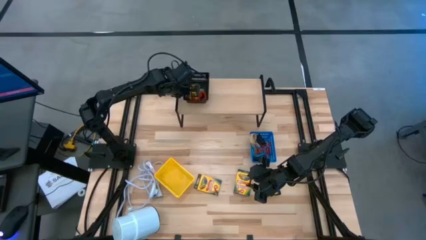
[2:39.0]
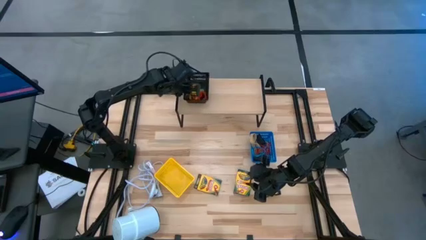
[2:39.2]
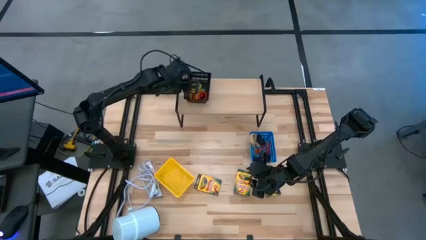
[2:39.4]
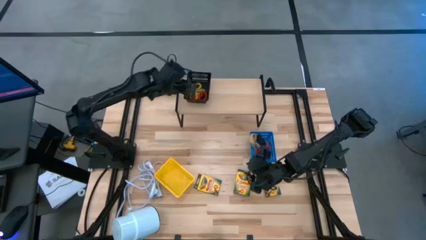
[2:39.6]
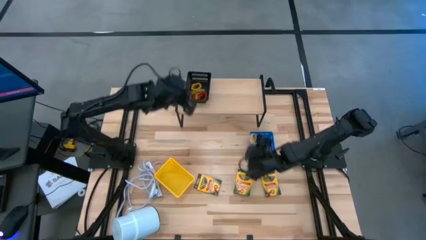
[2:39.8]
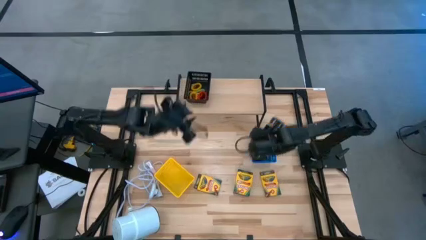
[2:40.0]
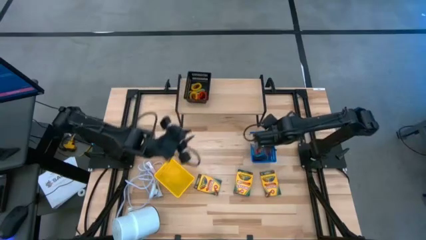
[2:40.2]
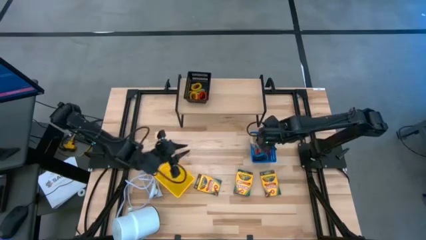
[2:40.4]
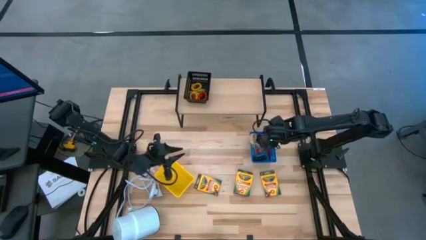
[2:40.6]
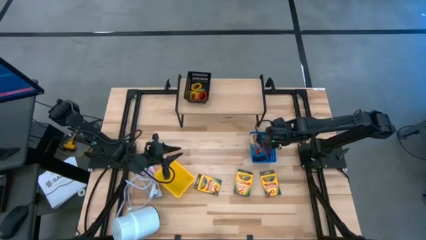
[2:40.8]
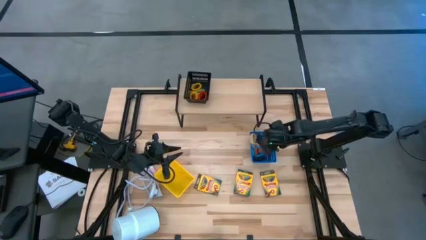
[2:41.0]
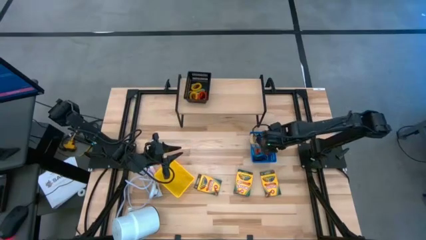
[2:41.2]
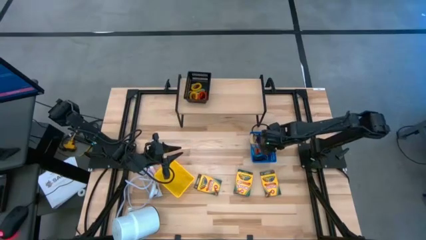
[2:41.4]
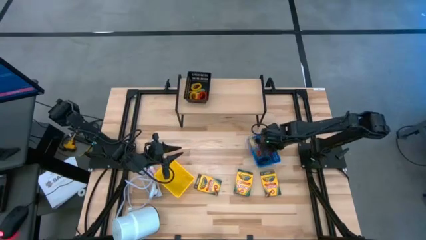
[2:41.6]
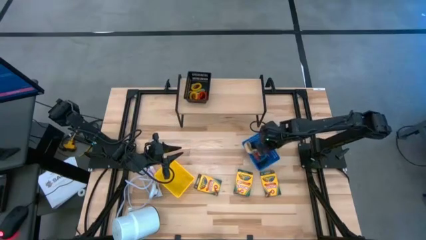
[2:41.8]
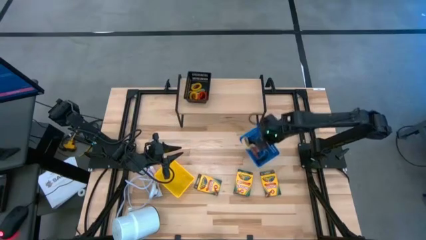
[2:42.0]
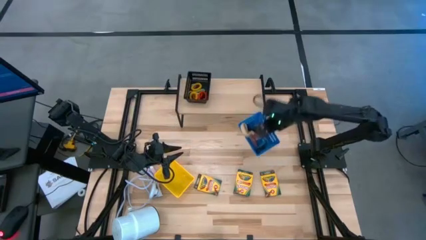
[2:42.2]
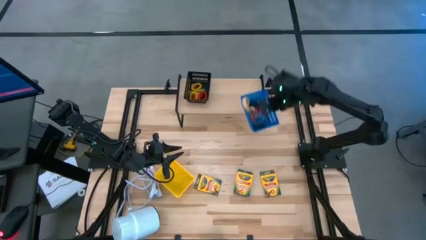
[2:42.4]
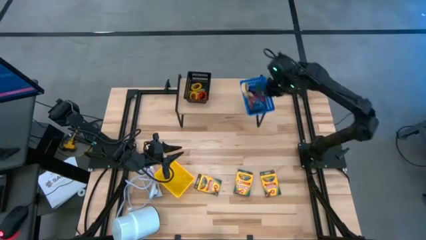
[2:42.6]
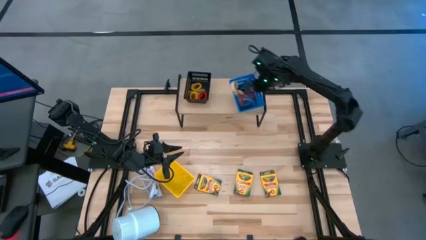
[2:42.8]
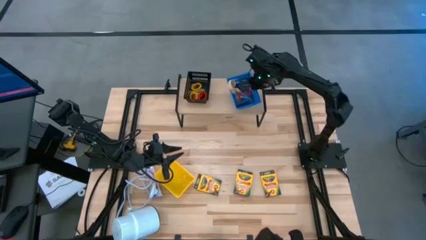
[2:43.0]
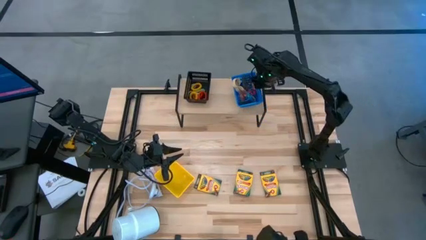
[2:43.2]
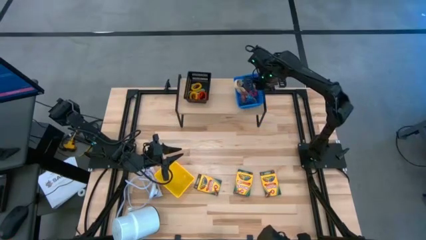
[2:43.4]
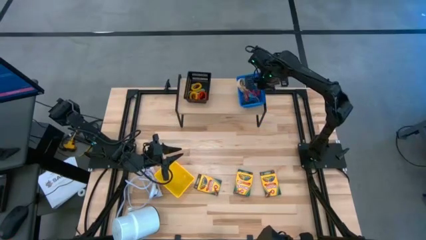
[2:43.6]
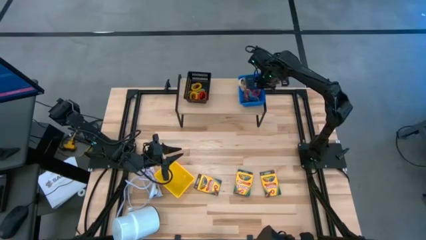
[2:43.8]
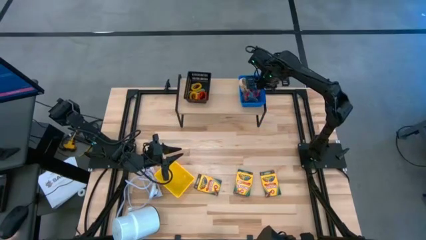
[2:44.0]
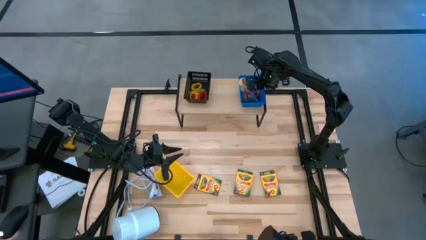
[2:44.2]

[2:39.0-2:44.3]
Task: Pick & Place Office Desk Supplies
Put the blue bin on top of the shelf

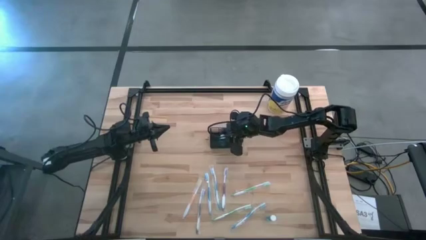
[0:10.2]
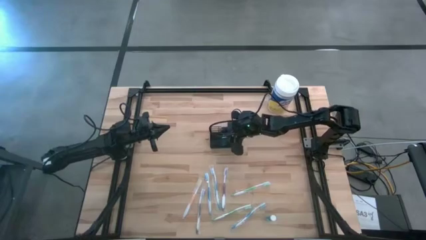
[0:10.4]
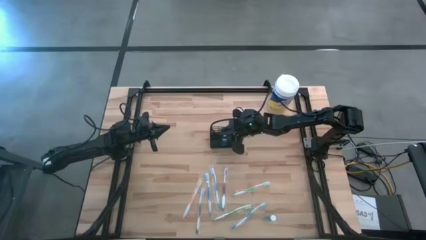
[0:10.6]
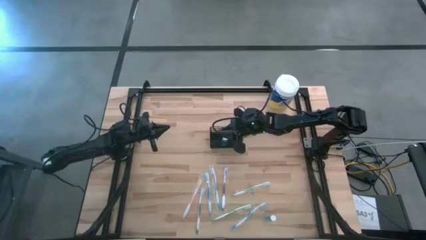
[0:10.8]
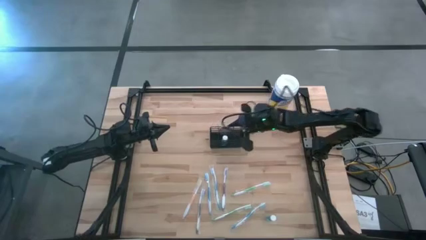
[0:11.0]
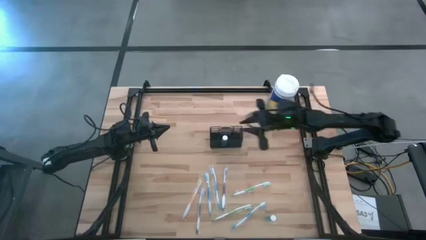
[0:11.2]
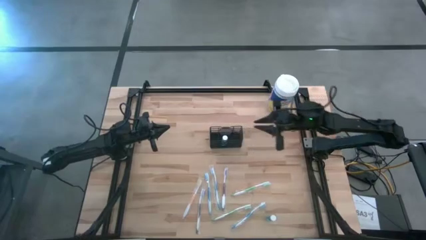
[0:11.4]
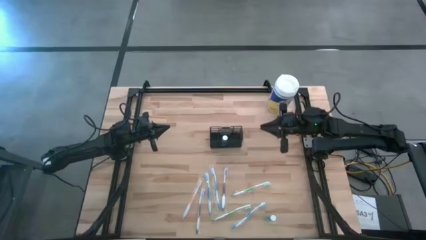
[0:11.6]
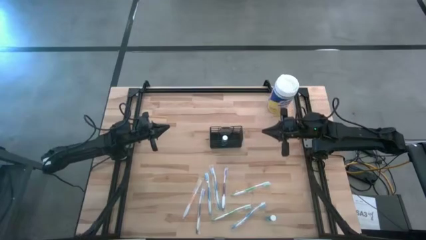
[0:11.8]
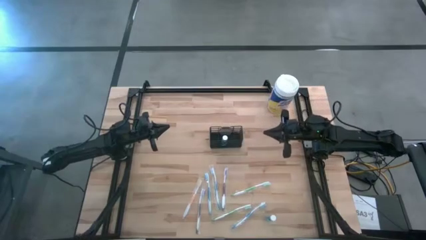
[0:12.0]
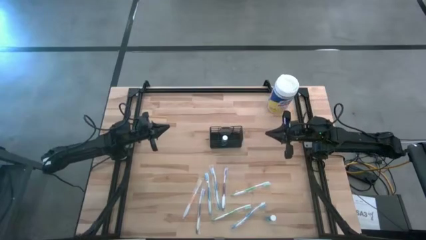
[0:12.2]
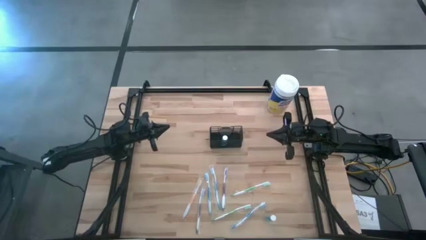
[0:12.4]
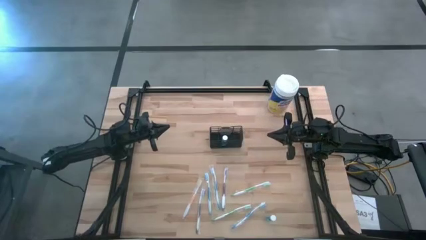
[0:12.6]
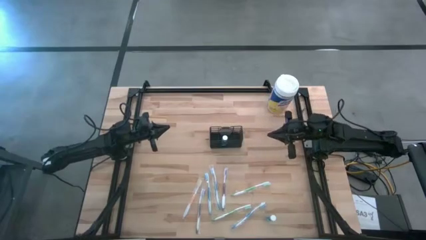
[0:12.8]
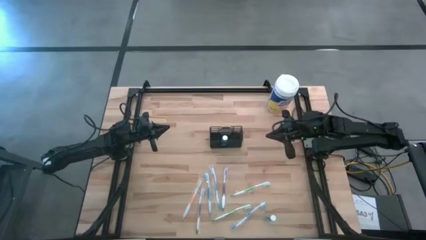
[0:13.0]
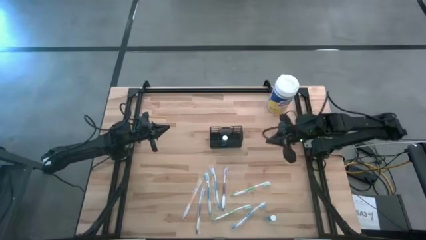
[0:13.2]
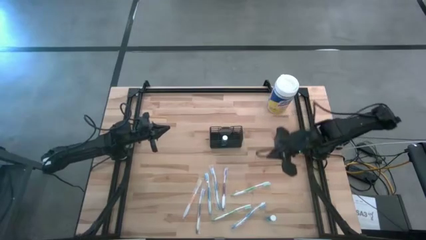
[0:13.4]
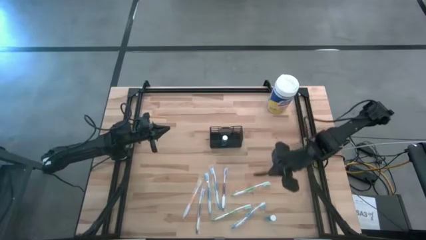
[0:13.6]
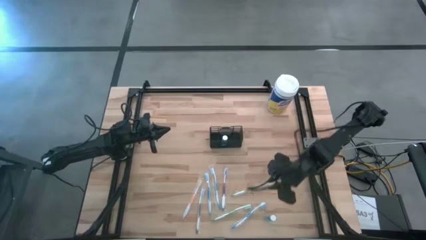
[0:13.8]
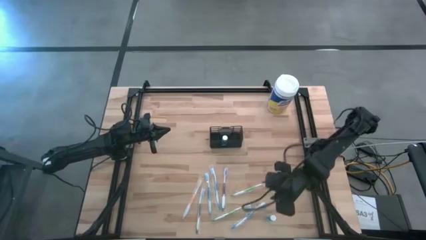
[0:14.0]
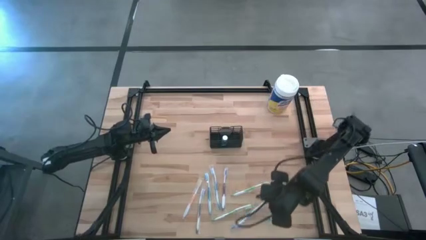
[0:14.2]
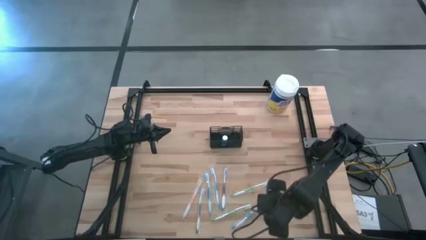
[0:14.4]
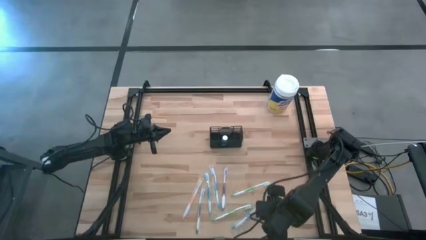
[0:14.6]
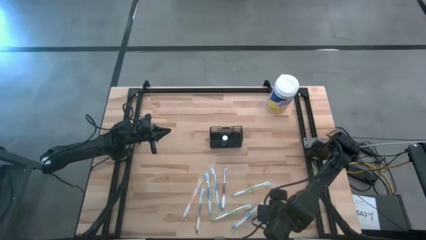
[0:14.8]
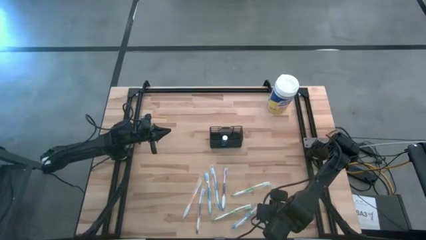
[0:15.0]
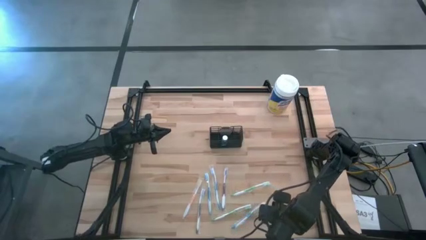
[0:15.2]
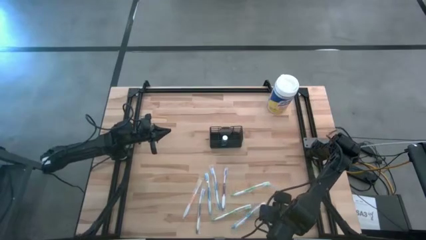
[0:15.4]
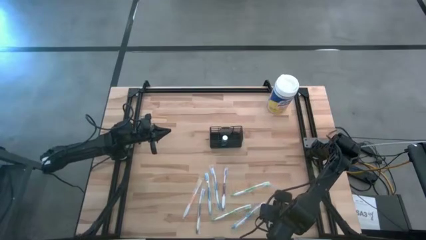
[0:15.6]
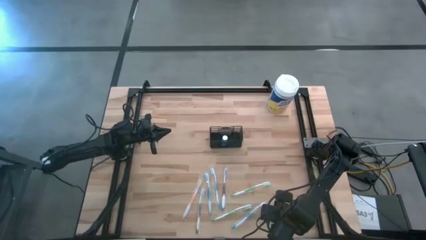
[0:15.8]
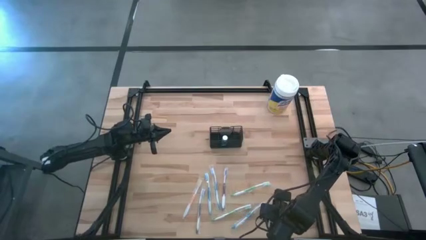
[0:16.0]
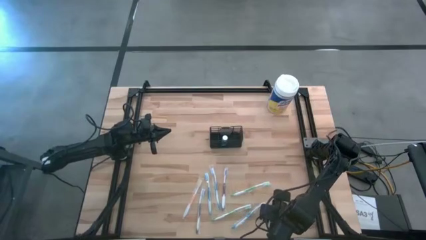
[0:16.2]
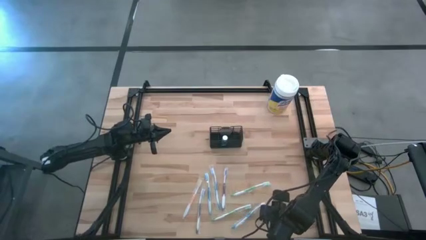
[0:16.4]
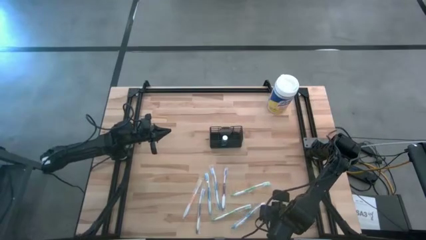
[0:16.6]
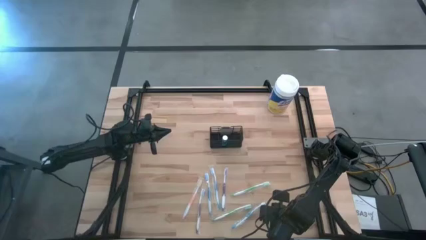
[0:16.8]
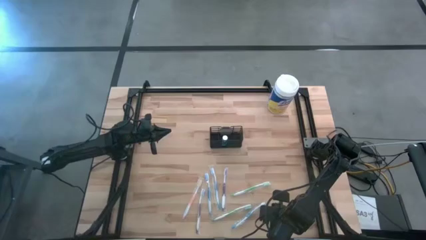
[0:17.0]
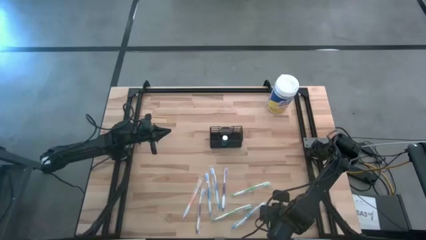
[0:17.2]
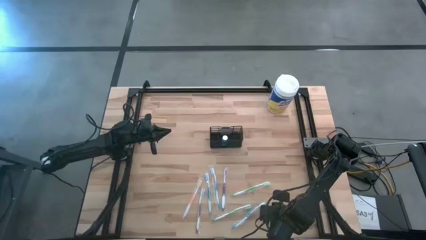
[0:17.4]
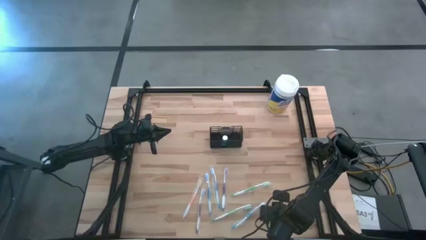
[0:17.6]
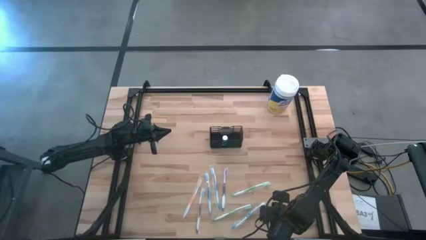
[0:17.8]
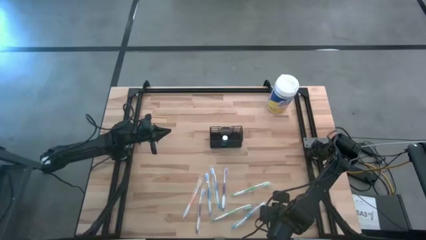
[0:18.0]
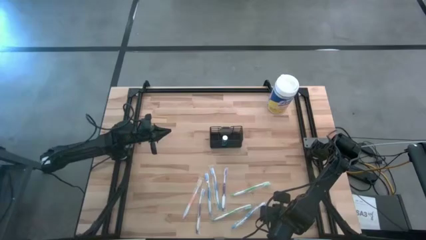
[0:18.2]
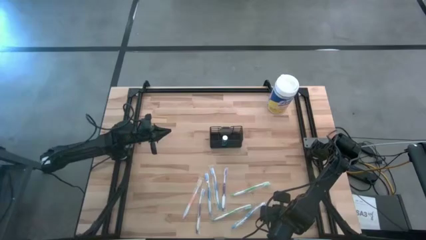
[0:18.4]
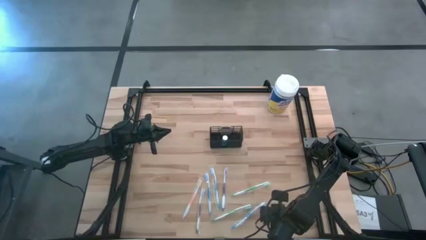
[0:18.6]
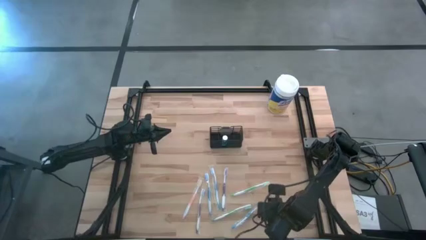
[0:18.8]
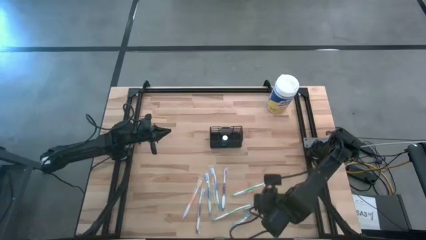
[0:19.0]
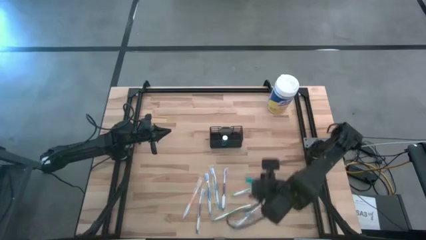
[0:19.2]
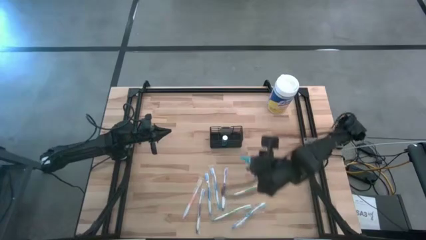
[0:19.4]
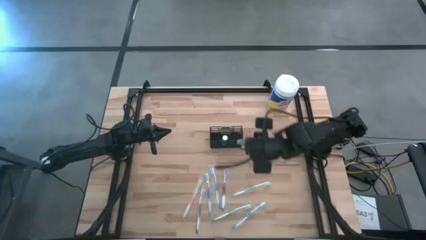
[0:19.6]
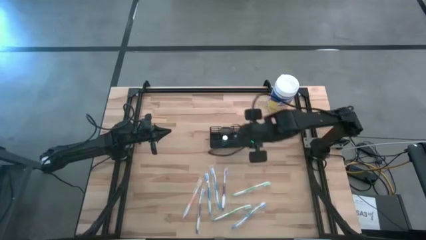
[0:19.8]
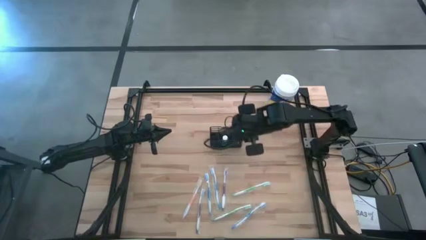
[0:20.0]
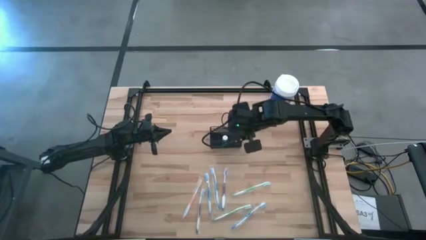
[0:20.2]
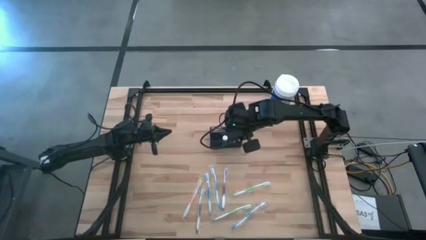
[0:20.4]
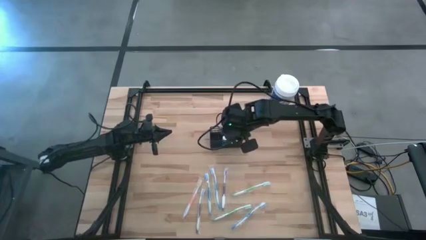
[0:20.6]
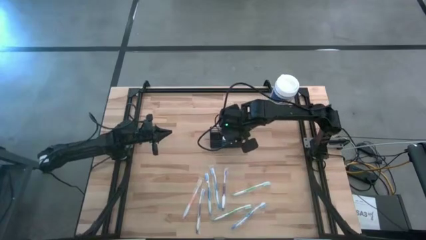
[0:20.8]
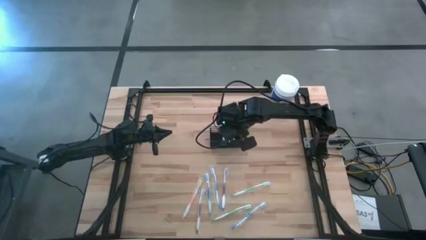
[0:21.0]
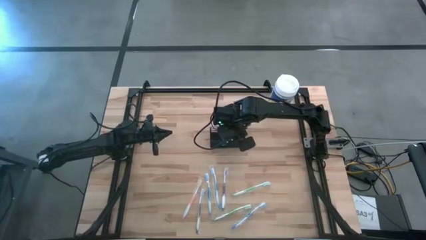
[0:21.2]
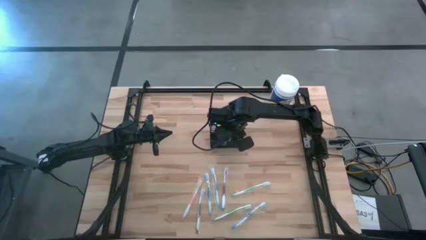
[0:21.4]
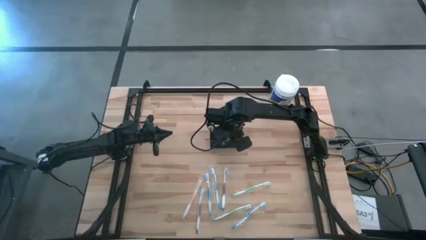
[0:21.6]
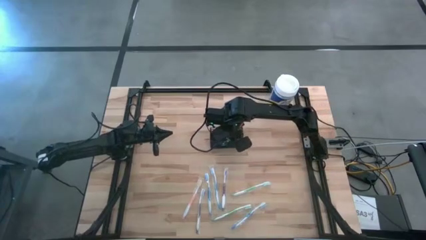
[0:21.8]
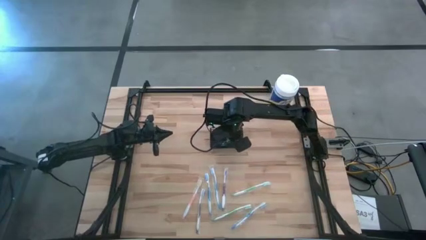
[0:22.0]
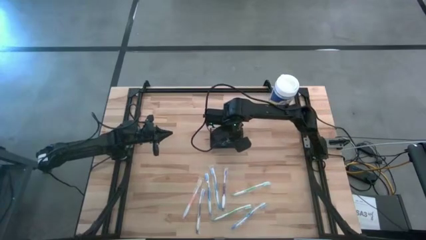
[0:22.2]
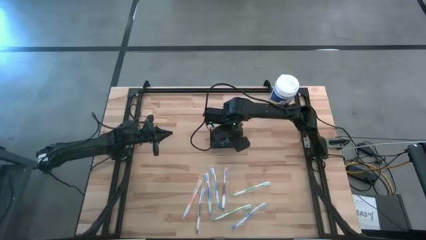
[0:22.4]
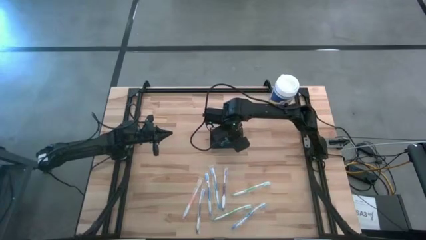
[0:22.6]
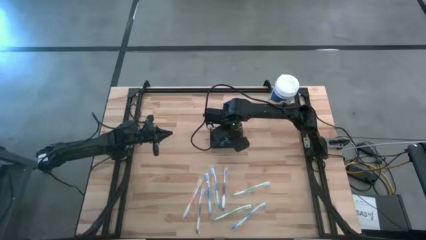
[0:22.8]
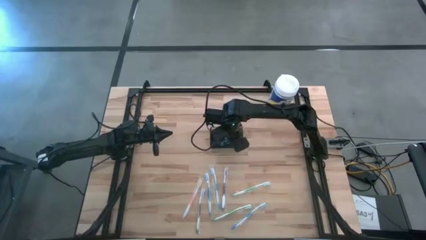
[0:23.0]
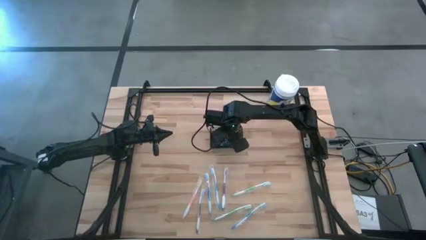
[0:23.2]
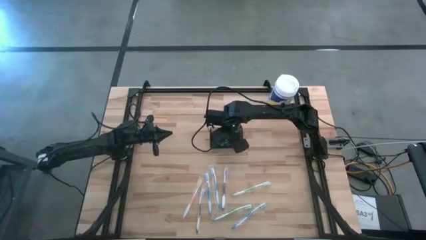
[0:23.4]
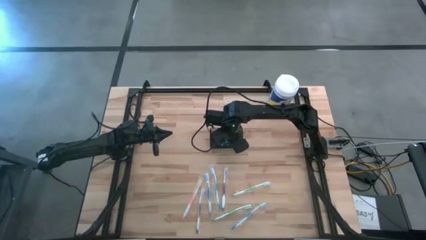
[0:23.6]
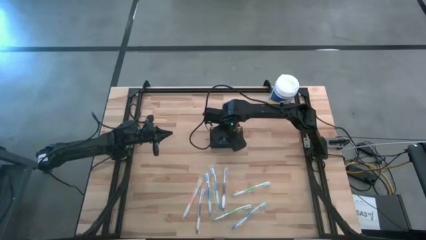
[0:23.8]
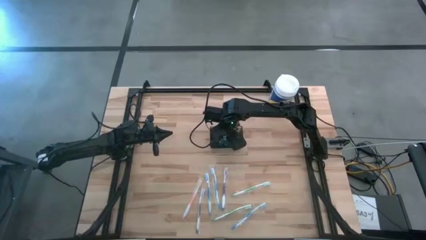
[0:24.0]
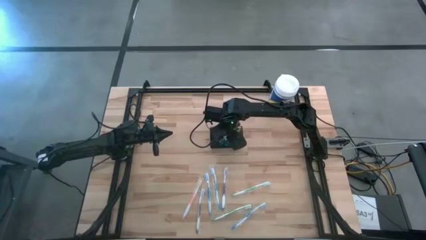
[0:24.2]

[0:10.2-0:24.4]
Task: Pick & Place toothbrushing station
Put the blue mouthwash into the black wire organizer
